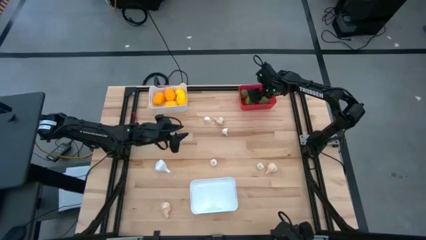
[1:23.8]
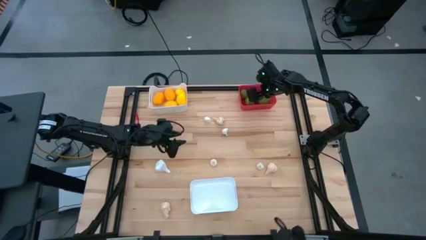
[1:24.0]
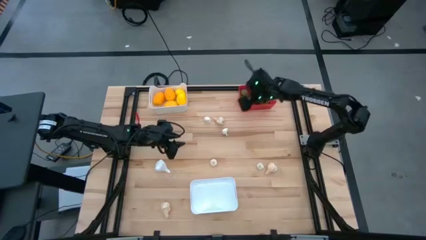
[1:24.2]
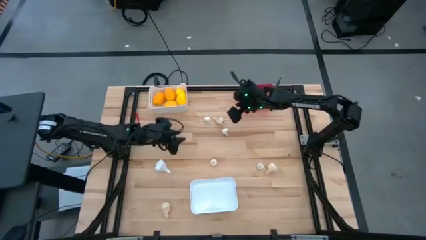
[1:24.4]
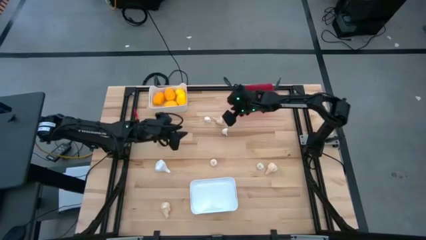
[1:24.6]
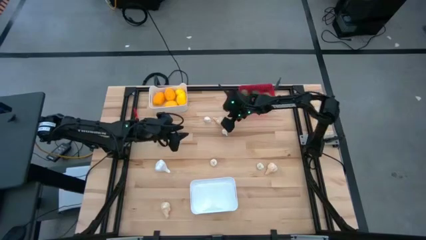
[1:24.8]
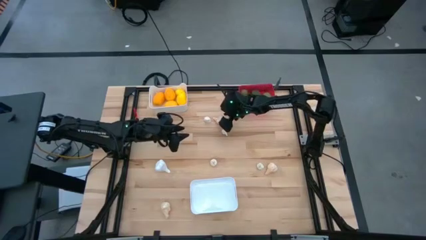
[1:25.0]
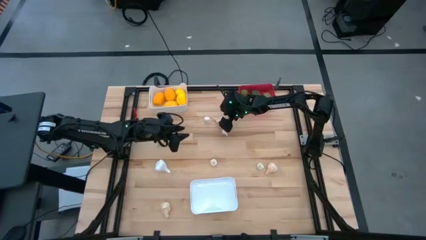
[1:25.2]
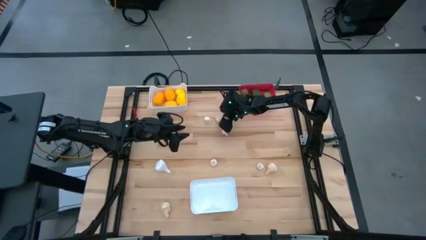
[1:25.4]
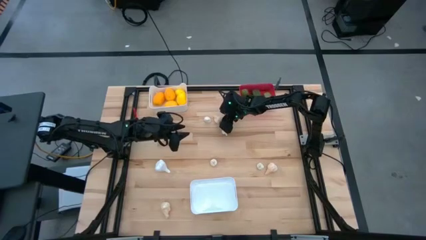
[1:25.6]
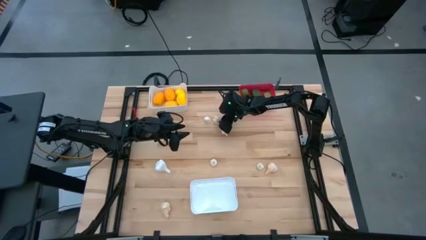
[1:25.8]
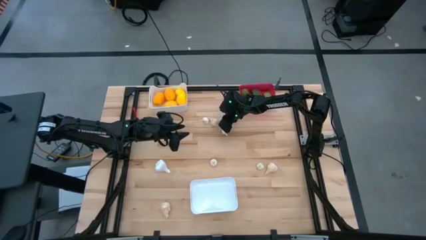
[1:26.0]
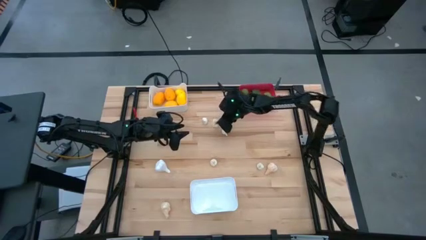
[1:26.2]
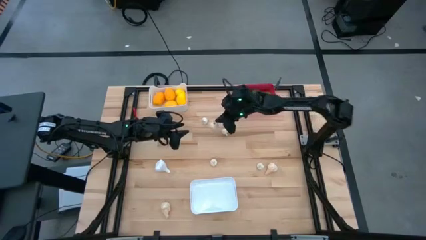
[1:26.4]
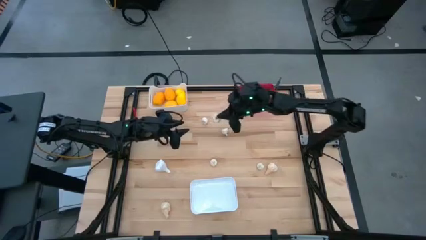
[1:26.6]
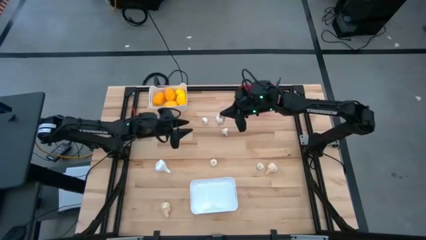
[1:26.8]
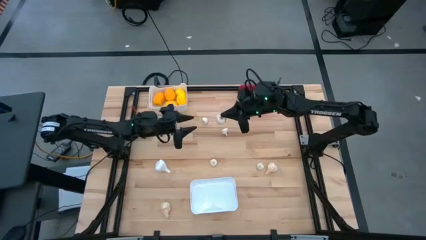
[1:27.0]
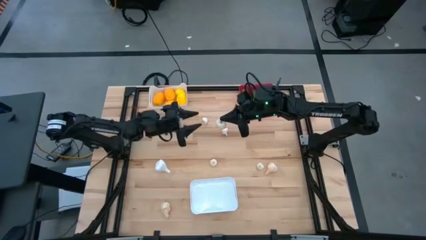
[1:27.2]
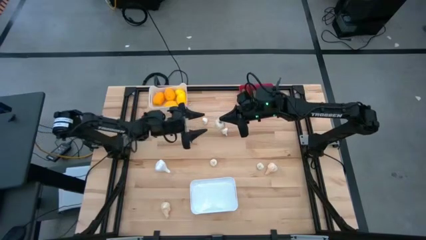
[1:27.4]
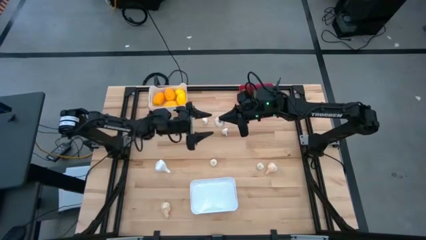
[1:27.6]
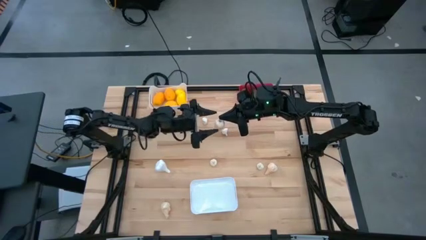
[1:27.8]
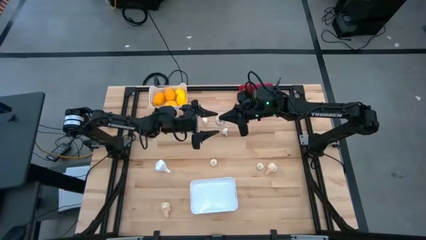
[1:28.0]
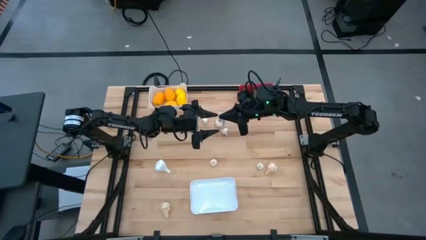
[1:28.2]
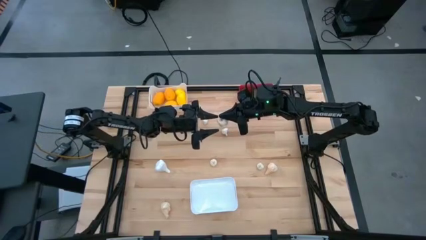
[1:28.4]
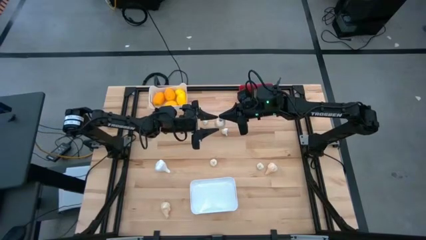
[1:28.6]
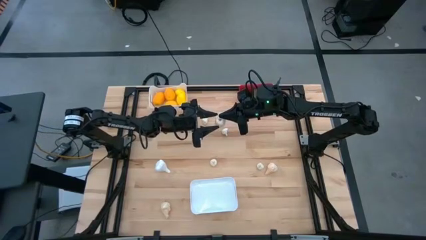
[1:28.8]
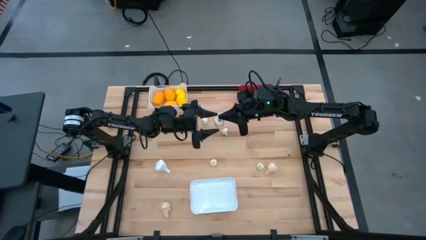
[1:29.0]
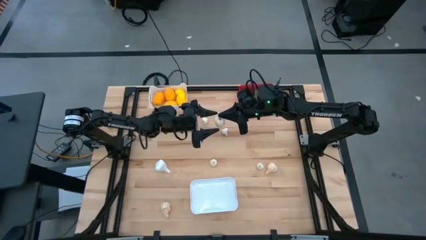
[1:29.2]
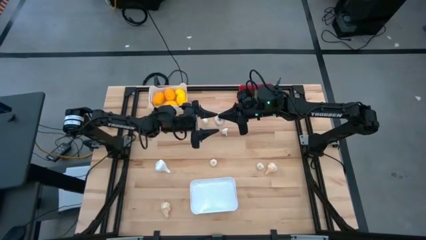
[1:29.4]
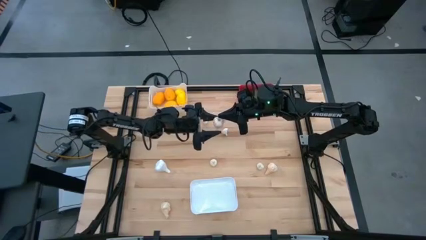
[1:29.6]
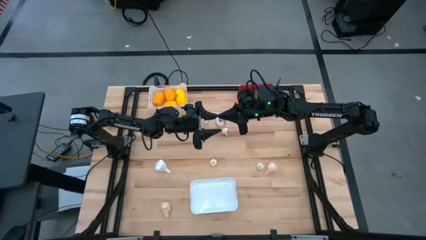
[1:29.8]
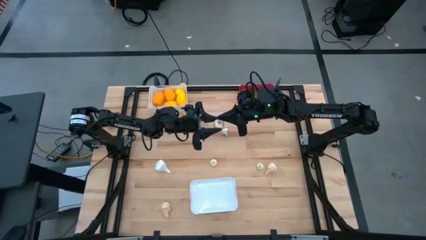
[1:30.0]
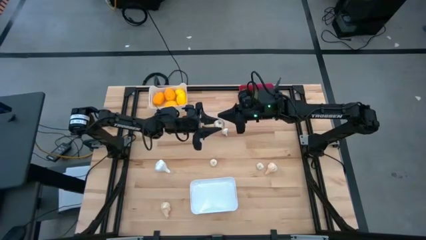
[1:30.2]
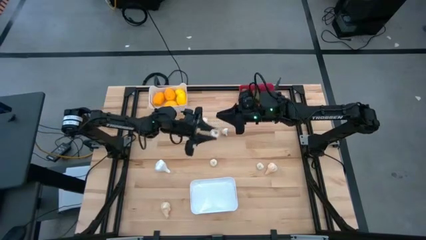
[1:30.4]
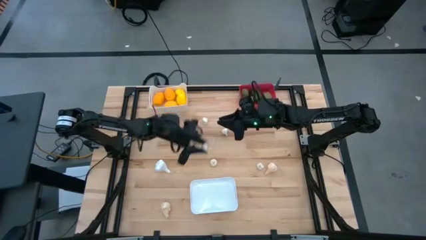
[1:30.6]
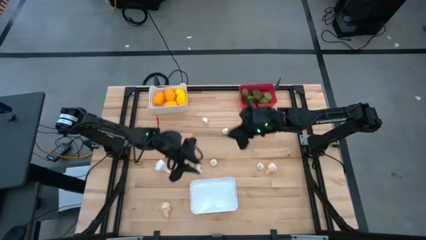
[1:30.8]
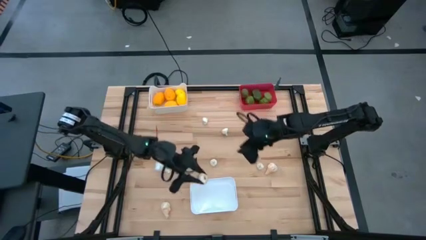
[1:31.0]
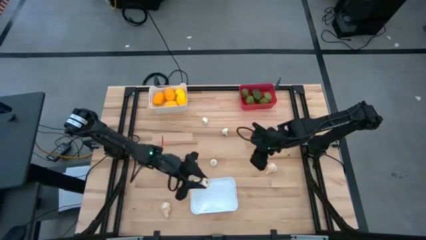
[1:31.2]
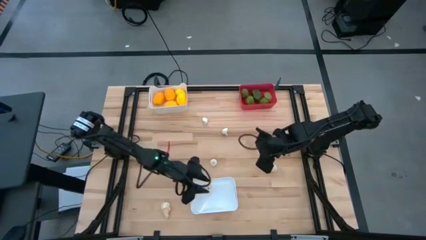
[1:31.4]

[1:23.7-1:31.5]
Task: Sort produce into baskets
Put the white garlic into the bottom white bin

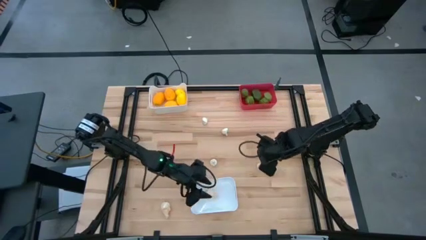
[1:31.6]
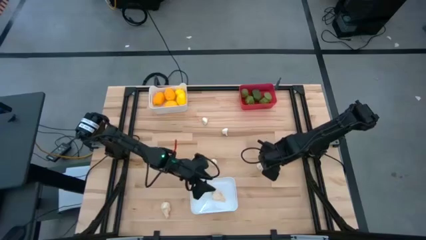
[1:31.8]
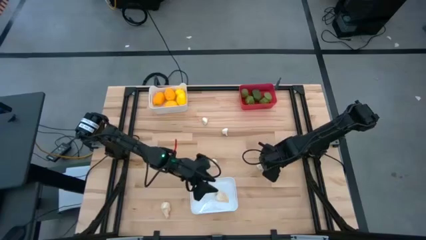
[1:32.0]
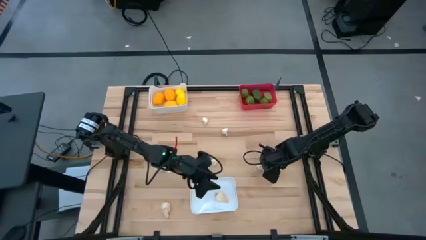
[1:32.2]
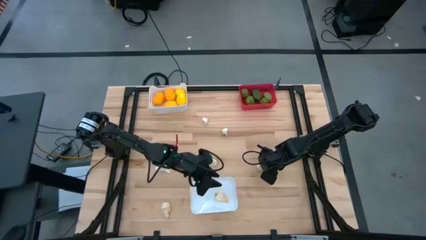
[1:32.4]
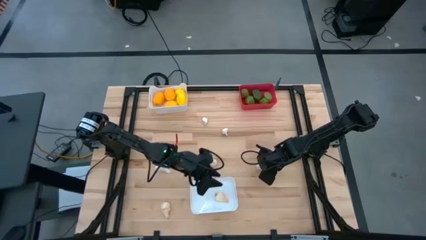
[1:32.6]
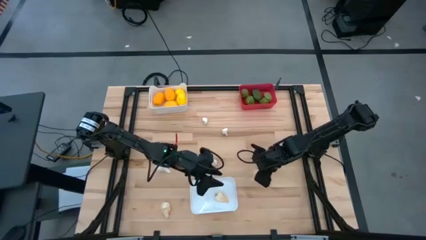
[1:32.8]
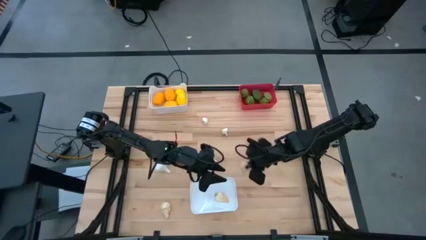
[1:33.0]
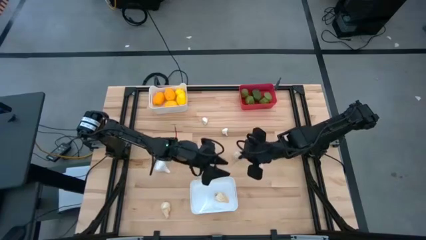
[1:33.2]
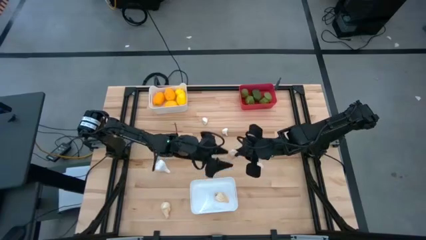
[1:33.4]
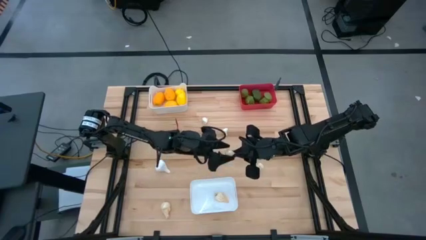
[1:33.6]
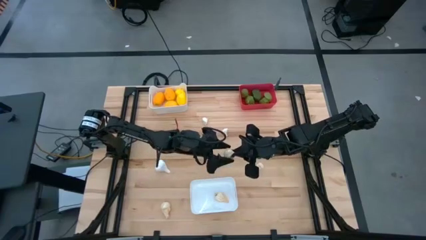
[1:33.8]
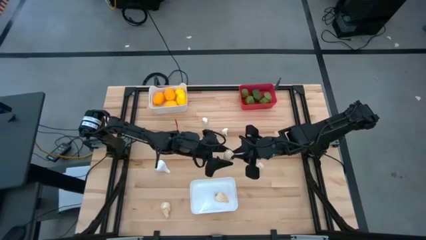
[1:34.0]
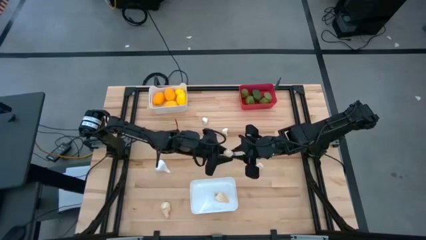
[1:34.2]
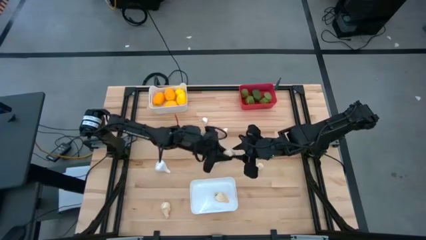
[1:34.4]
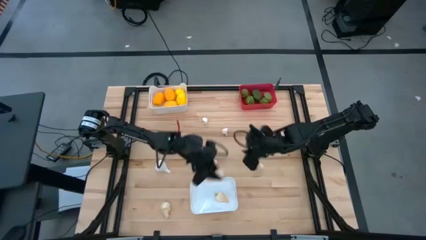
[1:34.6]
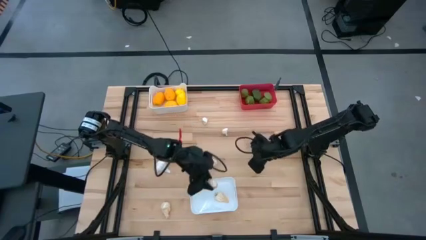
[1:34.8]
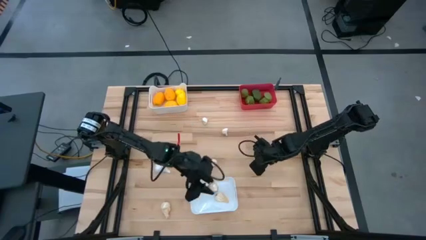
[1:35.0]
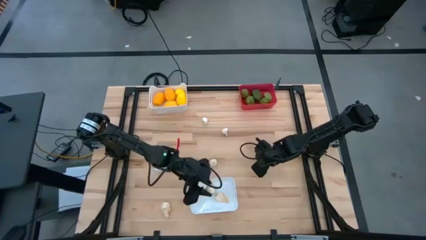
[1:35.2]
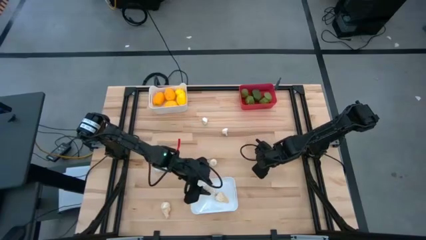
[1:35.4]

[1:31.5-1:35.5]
Put the white garlic into the bottom white bin

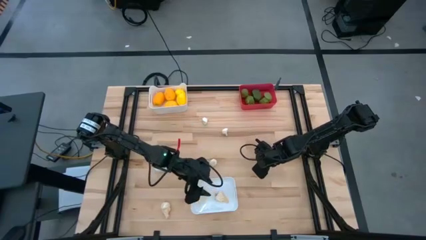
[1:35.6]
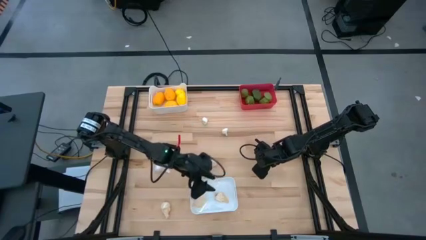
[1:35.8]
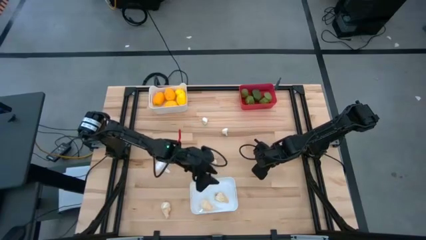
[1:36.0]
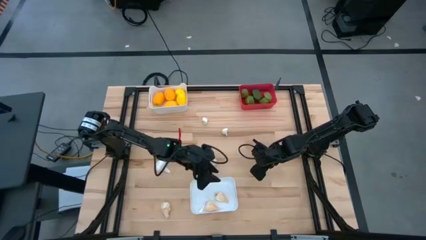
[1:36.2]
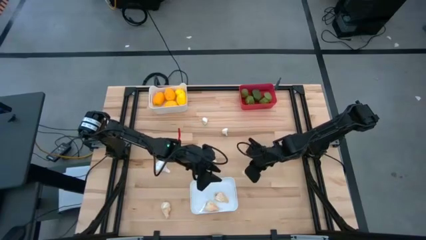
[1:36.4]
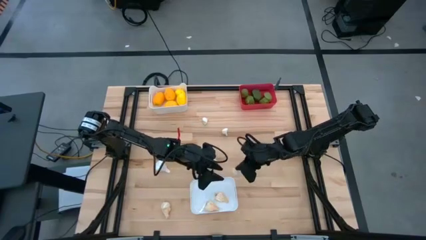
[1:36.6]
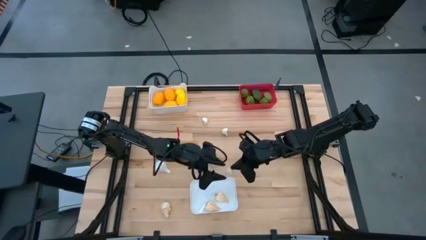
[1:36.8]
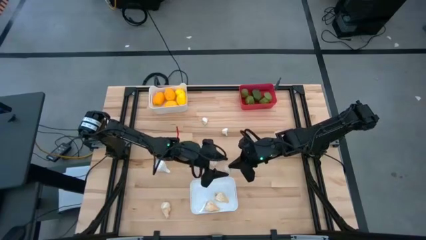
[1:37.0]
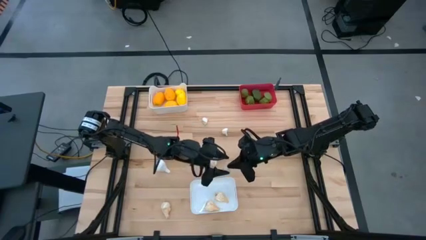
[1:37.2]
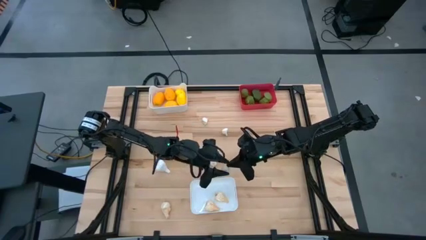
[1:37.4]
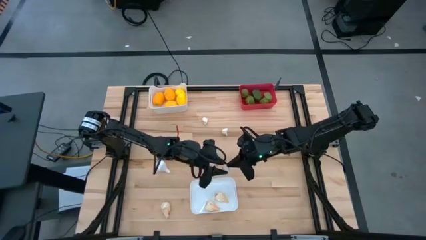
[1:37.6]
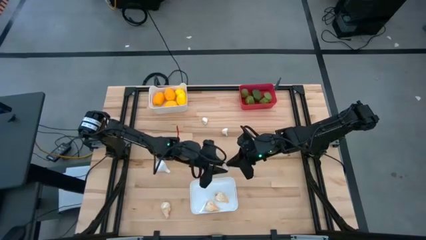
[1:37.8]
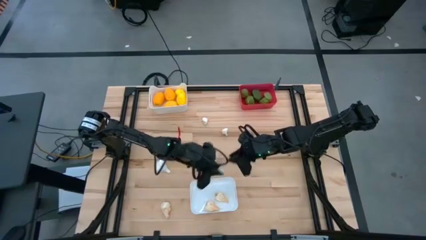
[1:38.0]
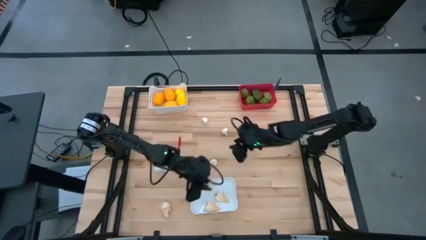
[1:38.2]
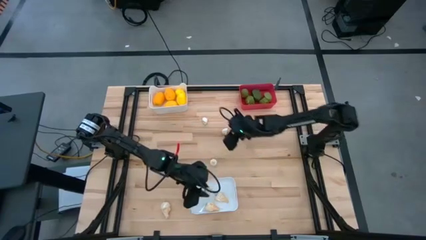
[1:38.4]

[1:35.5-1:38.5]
Put the white garlic into the bottom white bin

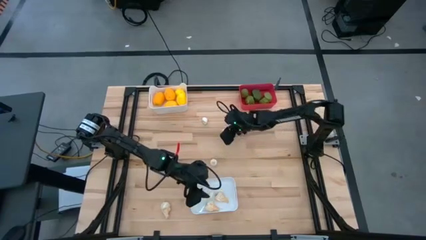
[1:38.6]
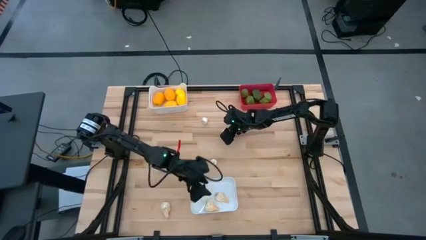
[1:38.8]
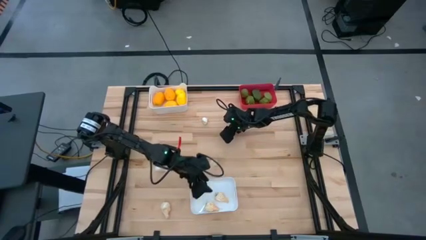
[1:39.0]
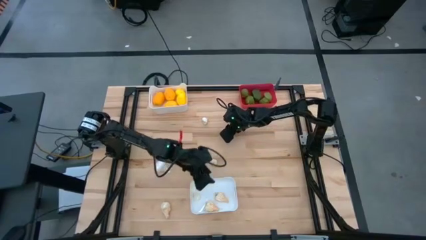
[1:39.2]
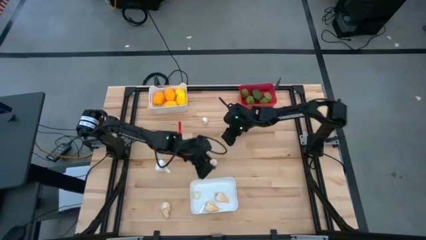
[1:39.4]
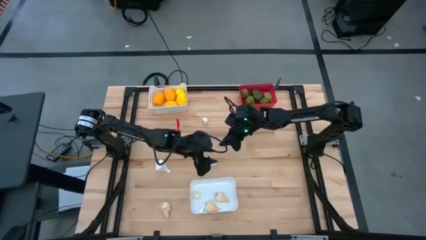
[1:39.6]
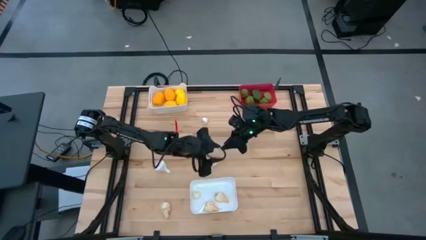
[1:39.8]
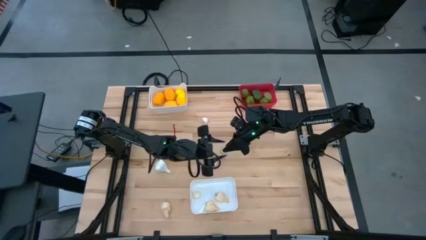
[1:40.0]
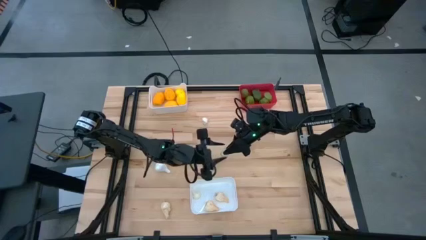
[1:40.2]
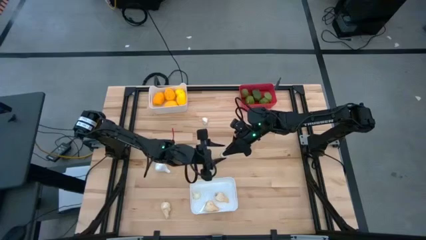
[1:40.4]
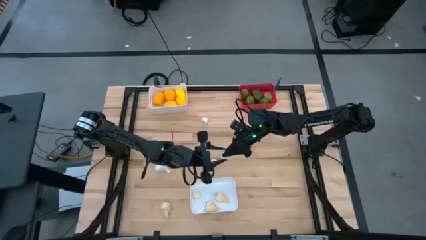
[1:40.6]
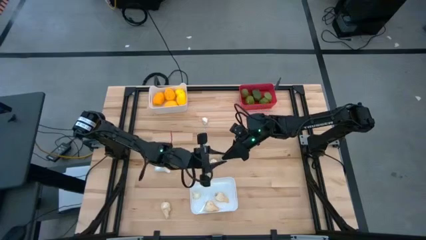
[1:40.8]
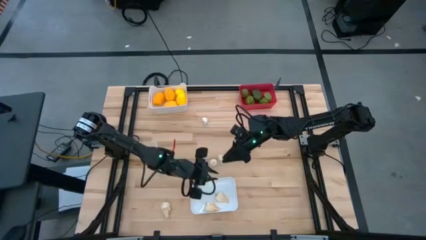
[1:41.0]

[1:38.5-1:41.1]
Put the white garlic into the bottom white bin
